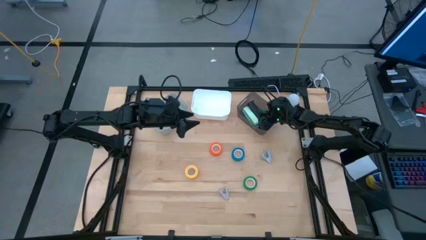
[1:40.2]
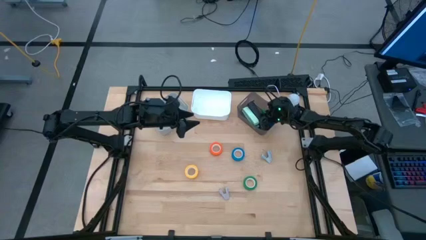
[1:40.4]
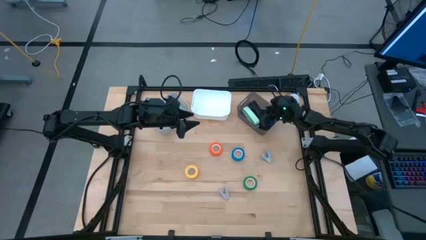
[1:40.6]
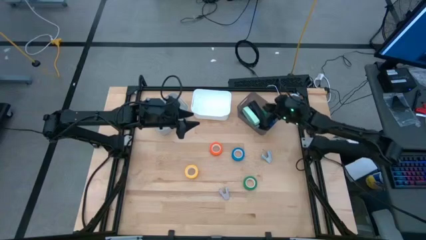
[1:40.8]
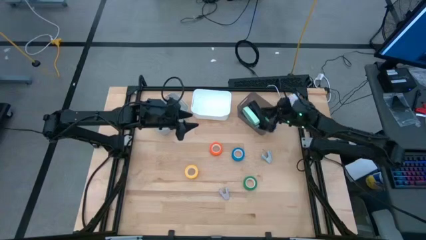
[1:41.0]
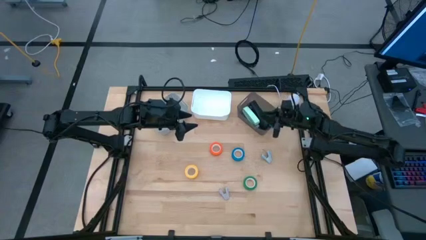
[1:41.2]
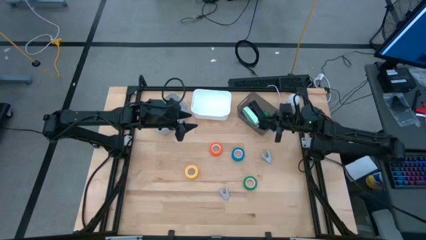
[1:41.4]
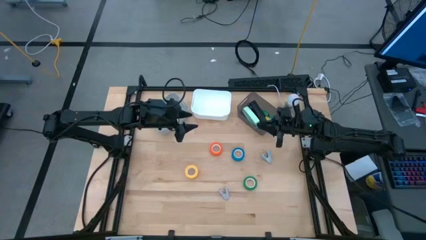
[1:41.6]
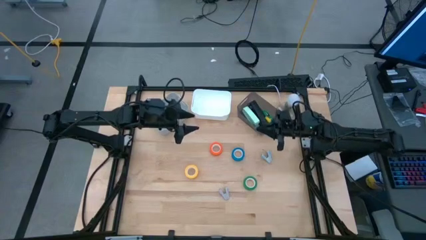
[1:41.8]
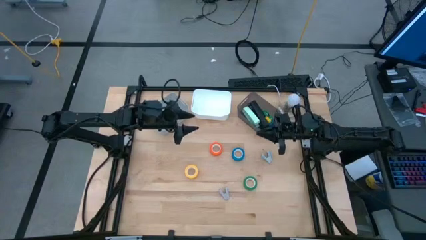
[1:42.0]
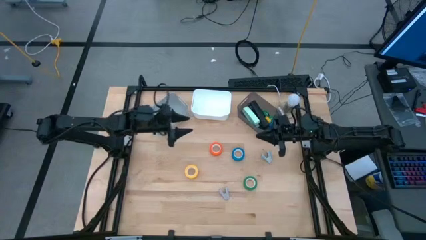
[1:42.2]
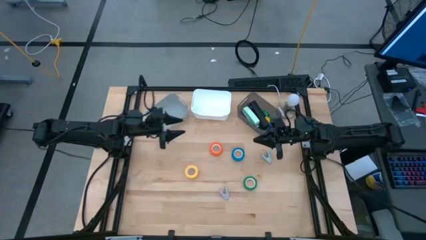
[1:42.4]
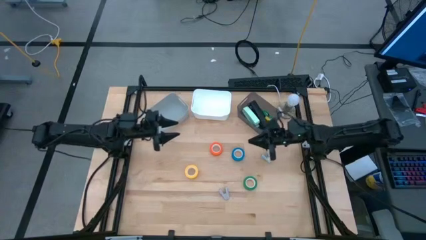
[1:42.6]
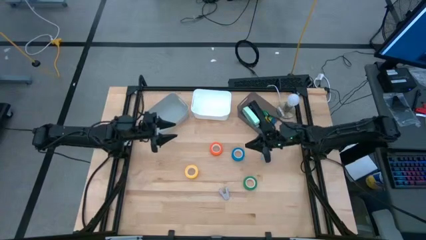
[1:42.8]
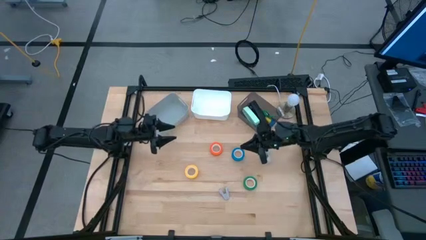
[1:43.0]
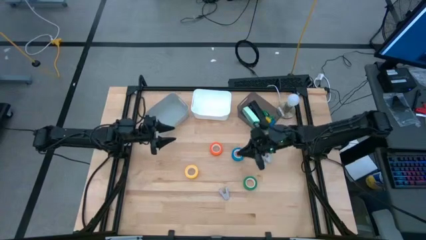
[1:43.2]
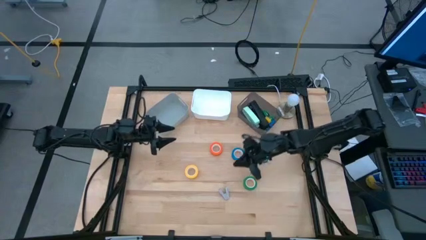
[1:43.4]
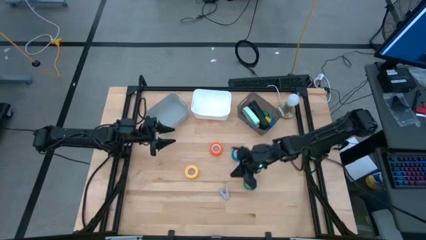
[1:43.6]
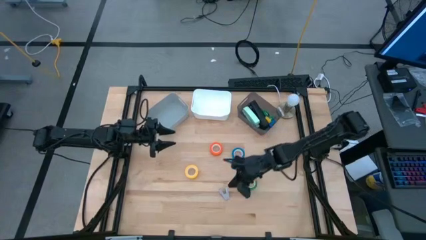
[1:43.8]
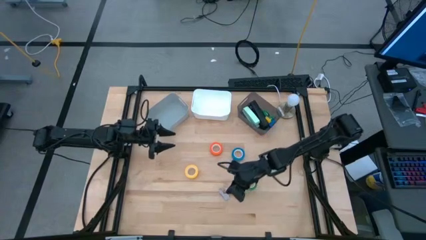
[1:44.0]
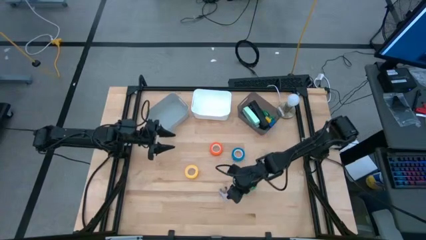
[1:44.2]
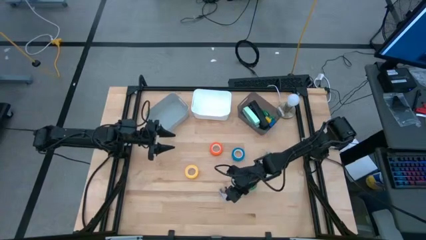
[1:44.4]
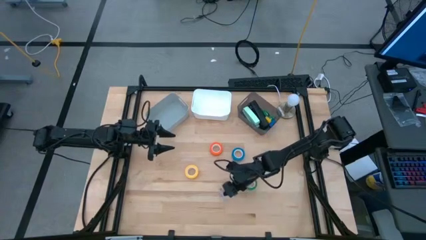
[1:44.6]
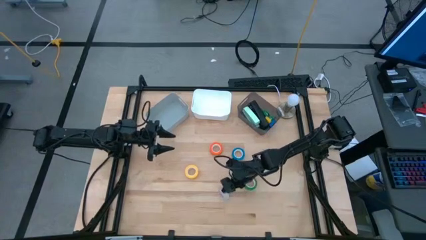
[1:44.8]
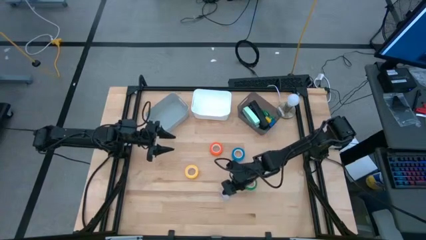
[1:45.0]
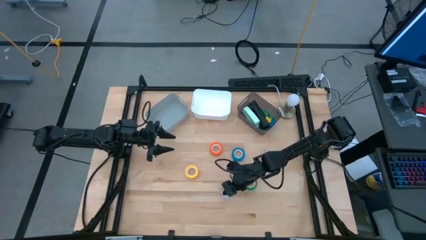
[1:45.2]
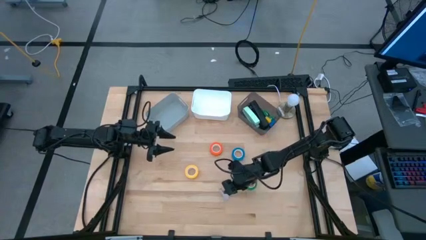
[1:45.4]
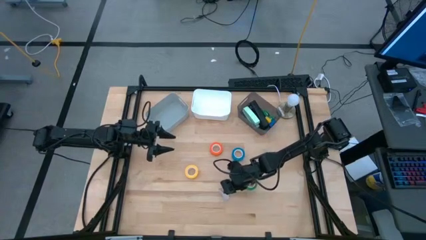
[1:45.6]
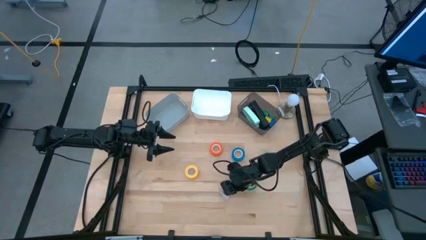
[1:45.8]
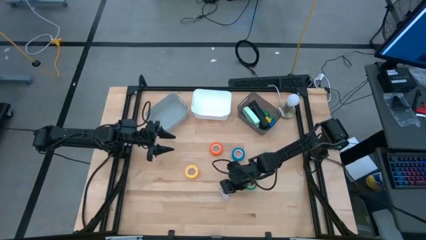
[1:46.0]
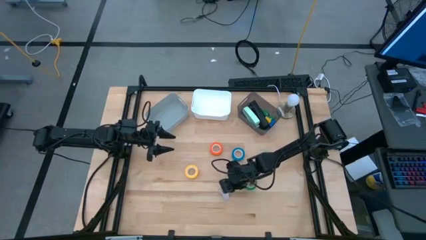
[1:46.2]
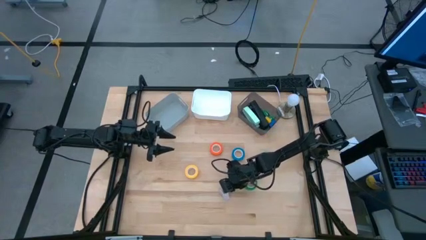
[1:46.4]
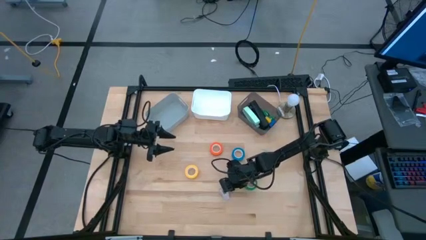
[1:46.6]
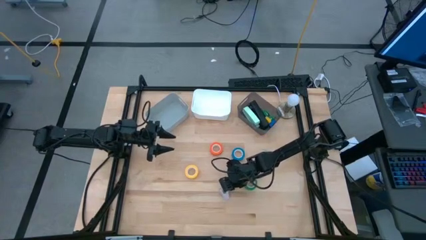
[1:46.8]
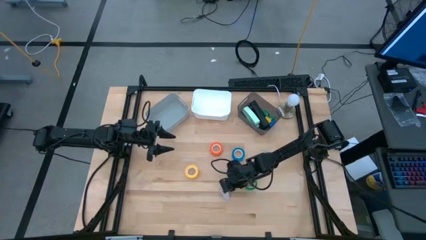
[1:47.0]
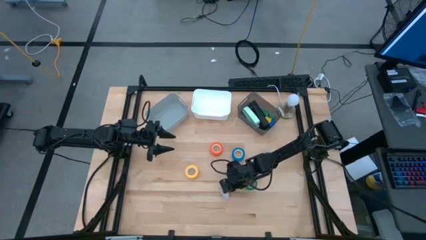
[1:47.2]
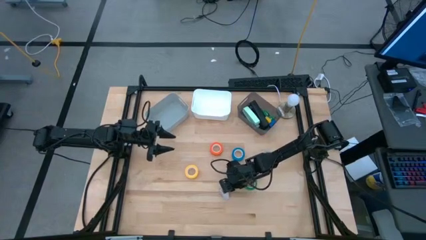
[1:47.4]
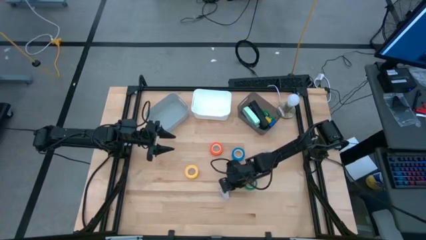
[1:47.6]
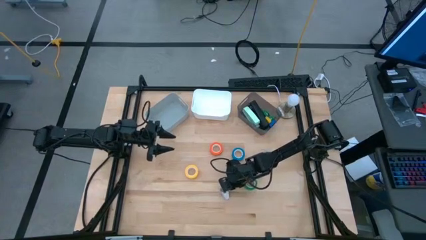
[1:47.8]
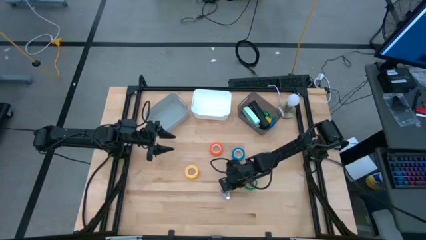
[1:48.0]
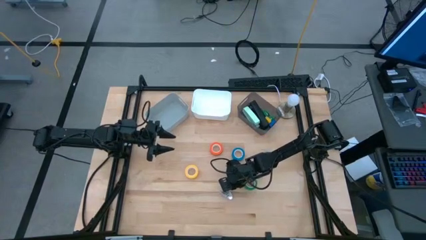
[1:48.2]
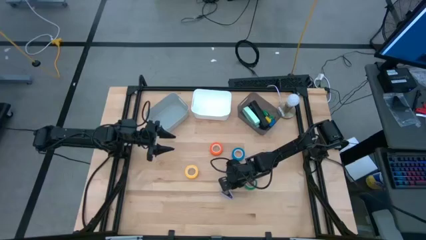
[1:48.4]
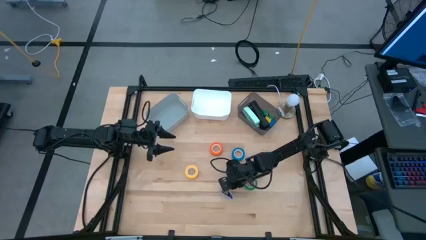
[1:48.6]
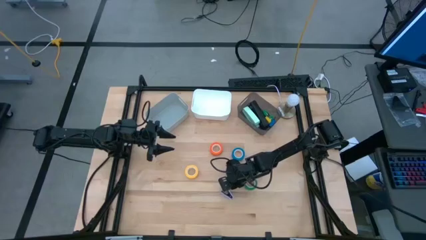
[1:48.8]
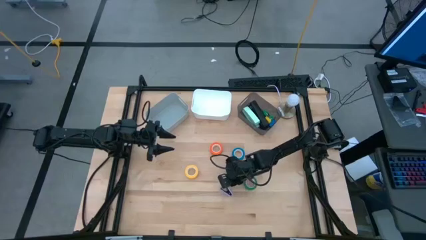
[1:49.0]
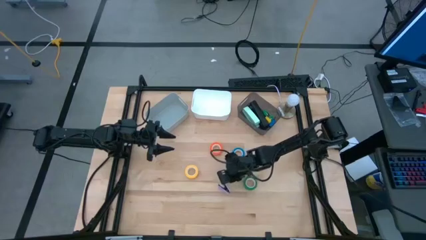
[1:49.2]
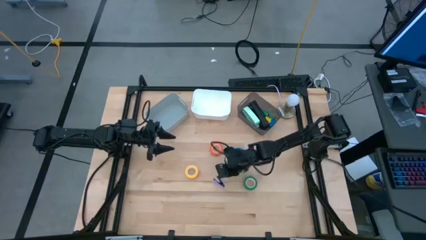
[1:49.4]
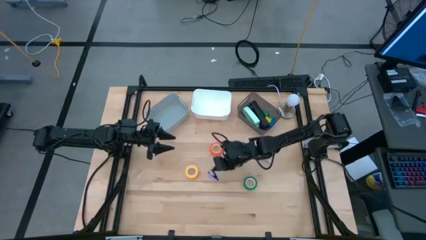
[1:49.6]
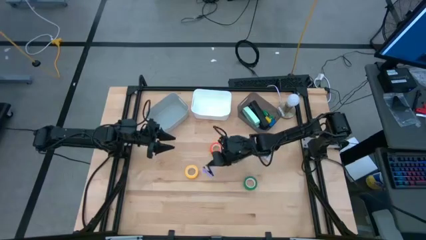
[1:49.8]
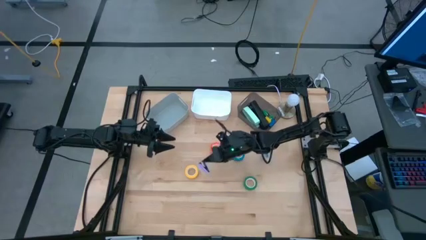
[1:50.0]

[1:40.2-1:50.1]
Task: Pick and place Stapler, Stapler remover, tape
Put the purple staple remover into the white bin

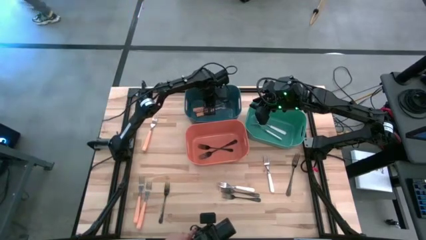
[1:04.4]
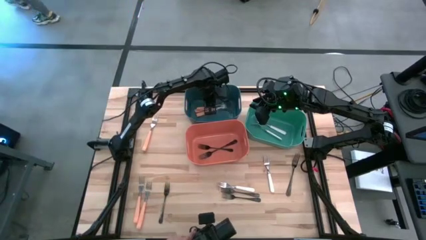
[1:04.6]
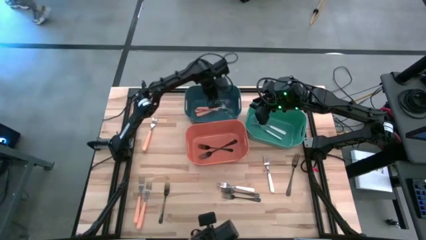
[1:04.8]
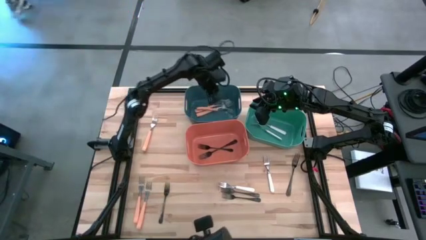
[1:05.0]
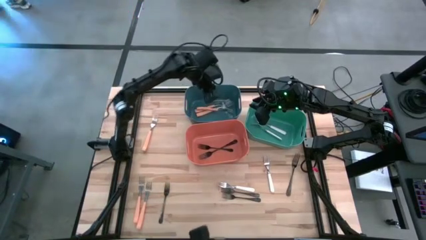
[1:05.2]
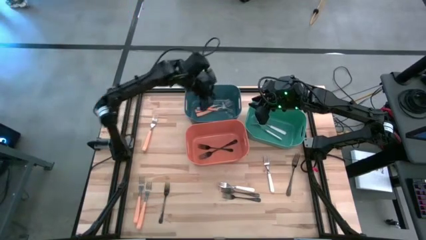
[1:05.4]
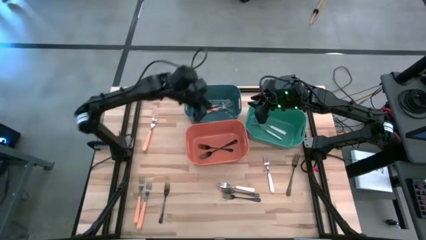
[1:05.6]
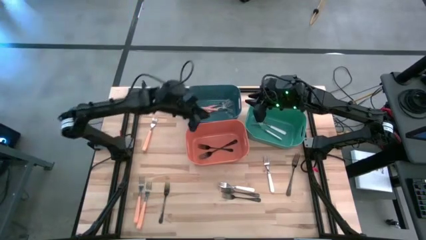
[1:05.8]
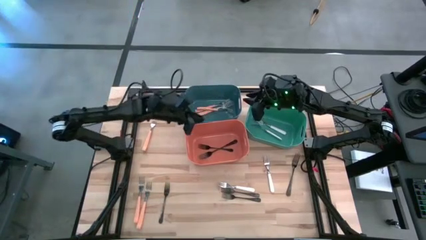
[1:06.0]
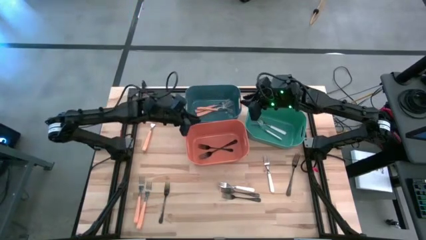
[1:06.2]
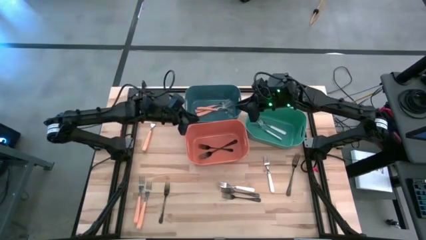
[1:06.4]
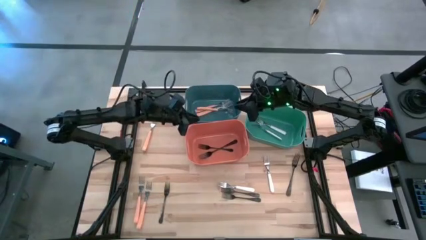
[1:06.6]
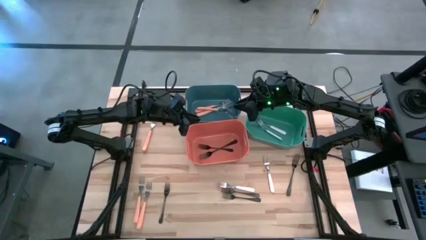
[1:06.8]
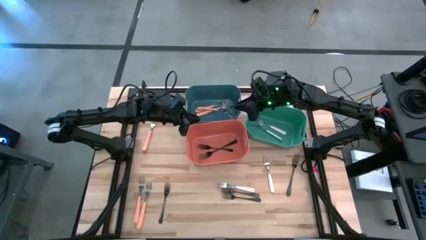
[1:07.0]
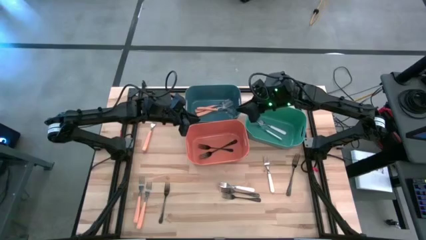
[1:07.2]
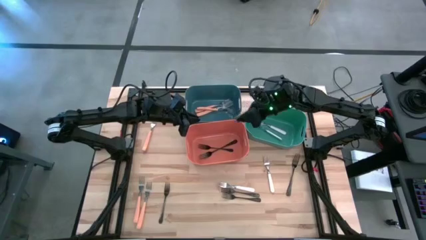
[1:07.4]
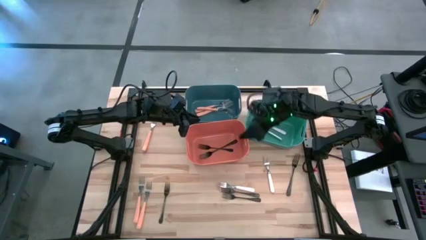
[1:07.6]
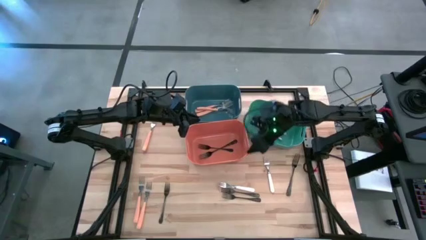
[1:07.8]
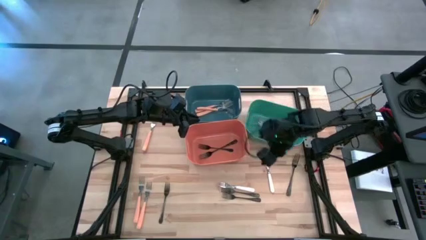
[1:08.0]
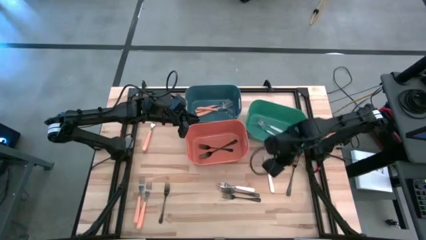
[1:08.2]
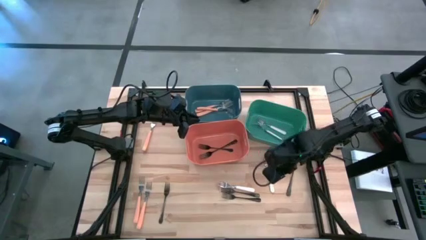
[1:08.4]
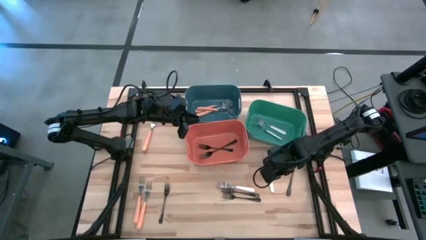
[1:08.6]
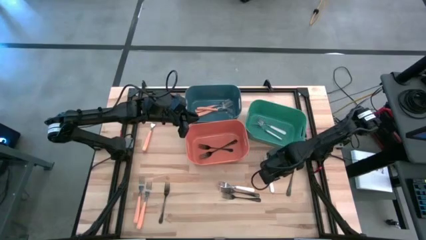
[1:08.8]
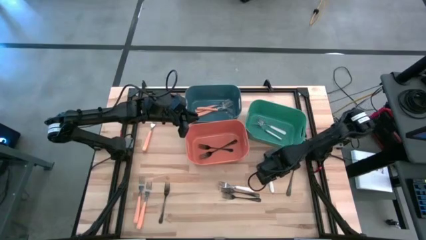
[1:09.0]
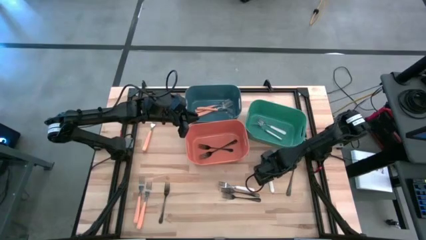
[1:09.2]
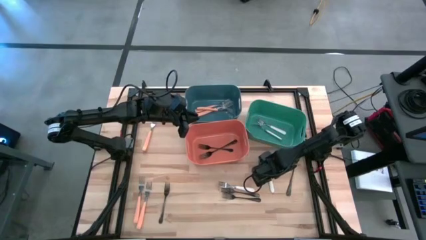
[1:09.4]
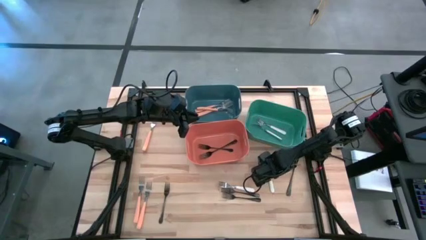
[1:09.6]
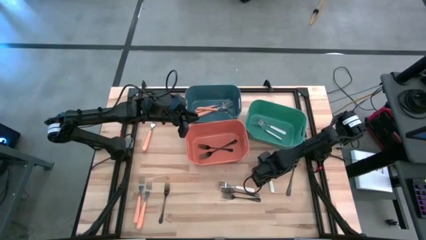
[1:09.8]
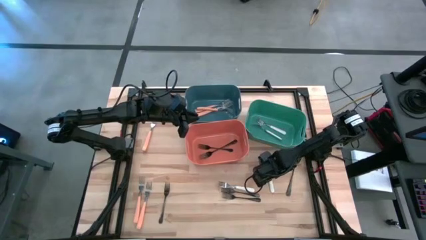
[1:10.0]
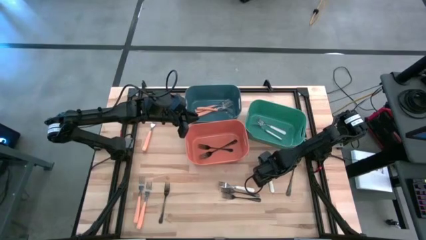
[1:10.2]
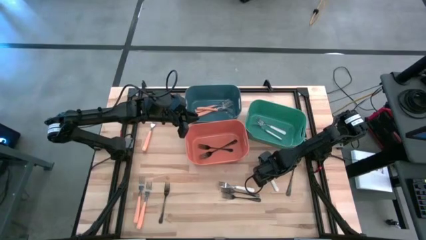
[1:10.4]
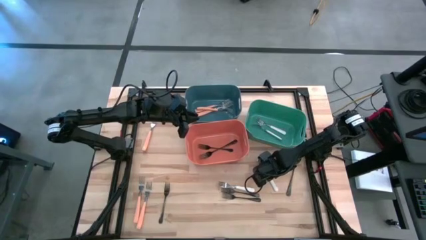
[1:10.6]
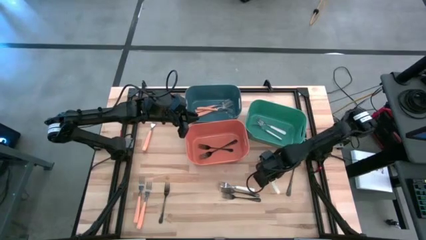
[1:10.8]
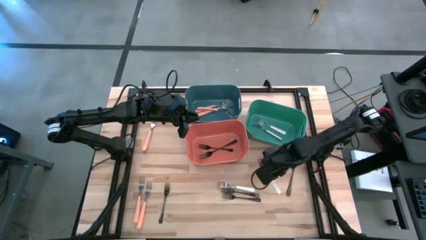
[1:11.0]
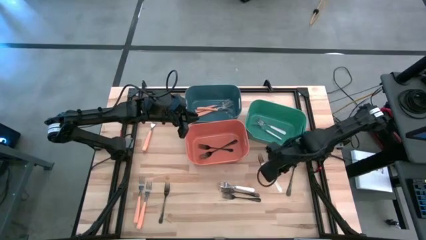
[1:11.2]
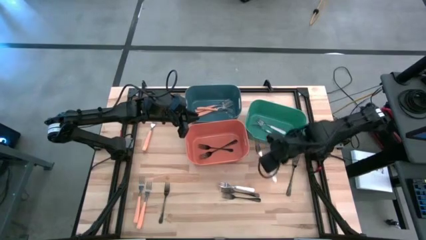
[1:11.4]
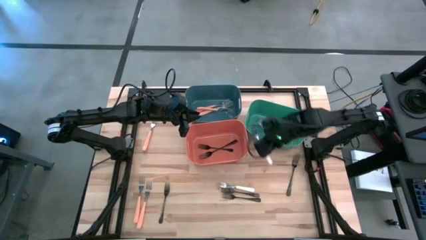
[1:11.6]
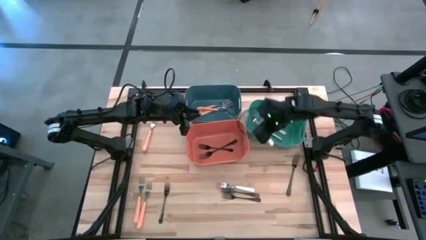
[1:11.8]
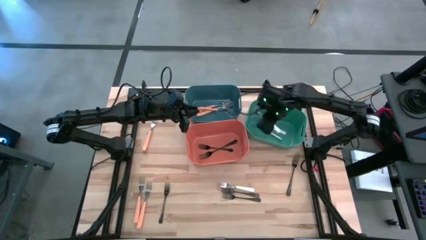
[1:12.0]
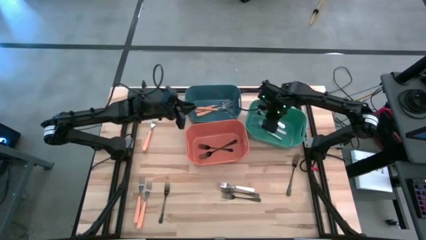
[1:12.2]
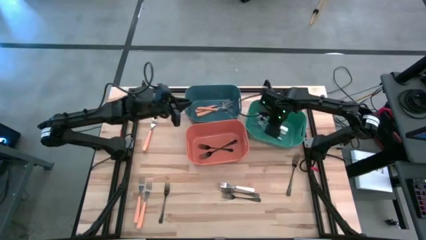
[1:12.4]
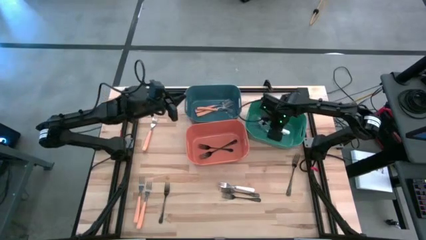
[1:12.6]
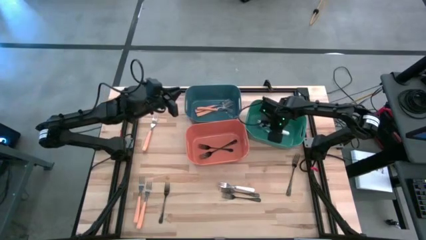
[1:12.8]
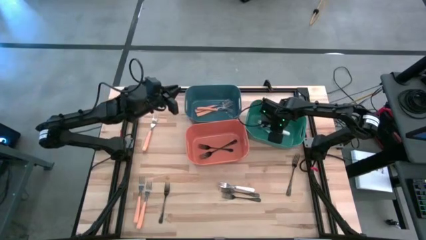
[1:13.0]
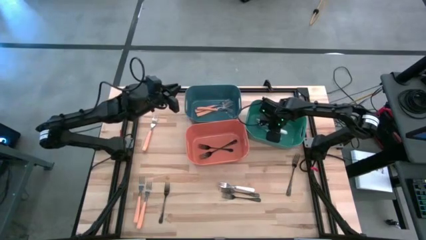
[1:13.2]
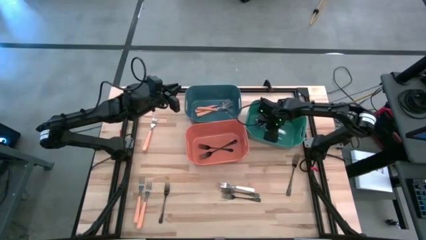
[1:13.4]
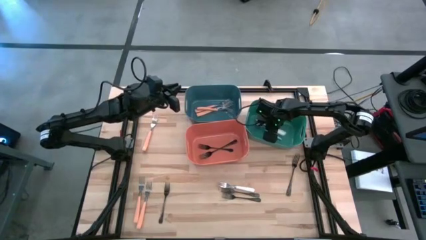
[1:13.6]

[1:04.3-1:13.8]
Task: Sort silverware by color (type)
Put the white fork into the green bin
